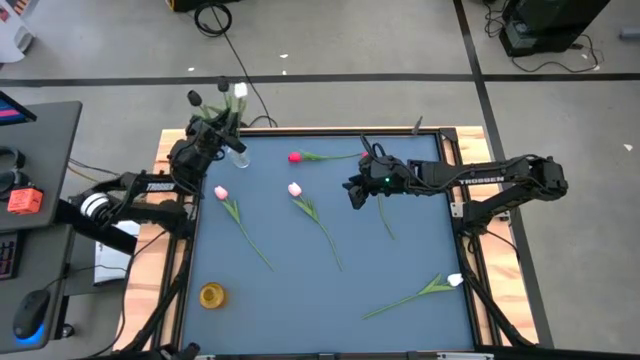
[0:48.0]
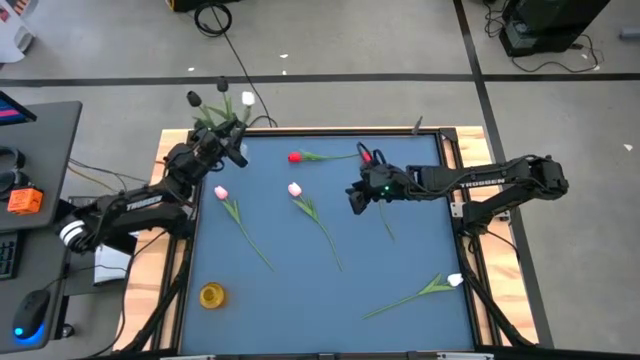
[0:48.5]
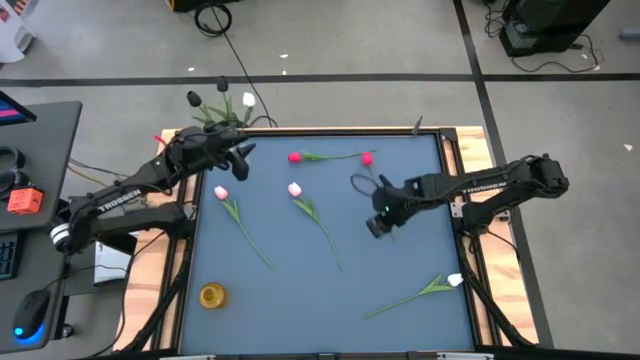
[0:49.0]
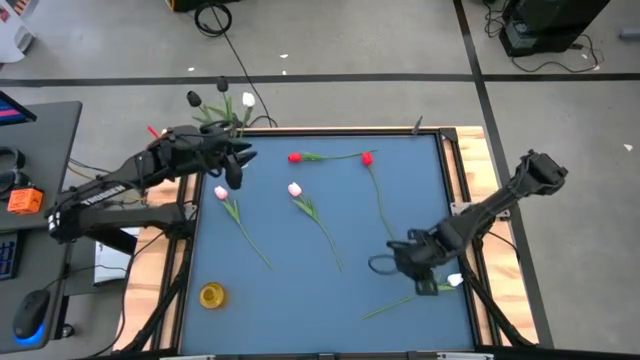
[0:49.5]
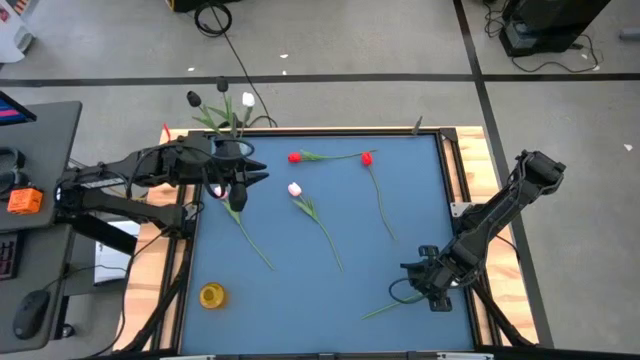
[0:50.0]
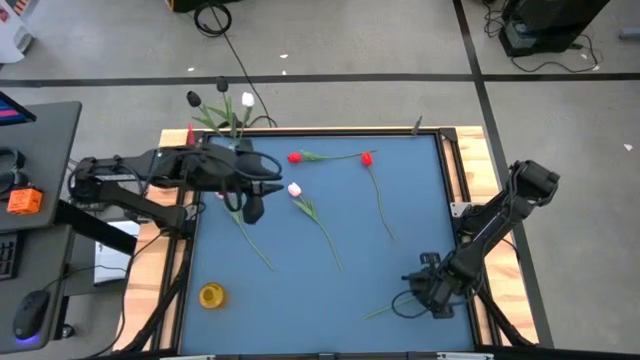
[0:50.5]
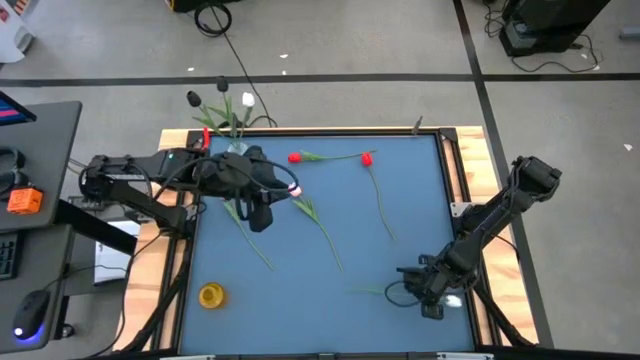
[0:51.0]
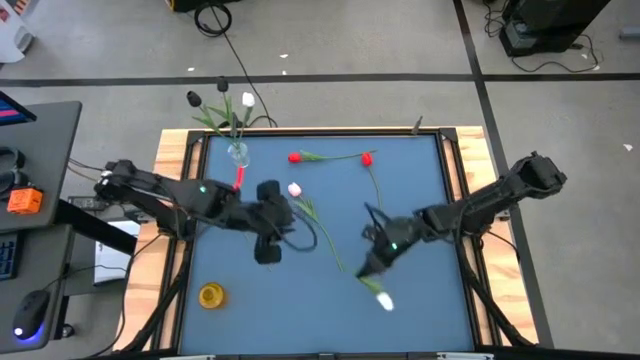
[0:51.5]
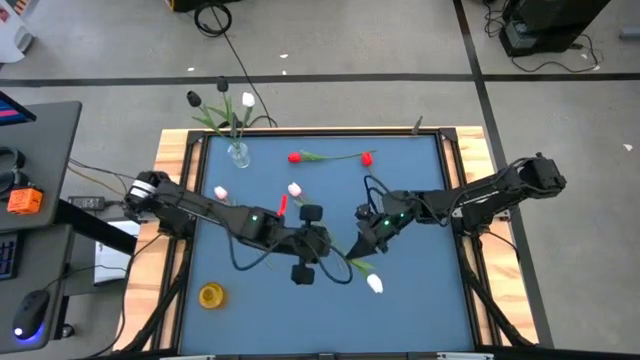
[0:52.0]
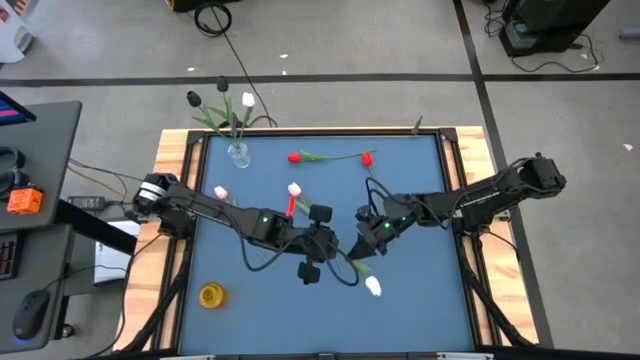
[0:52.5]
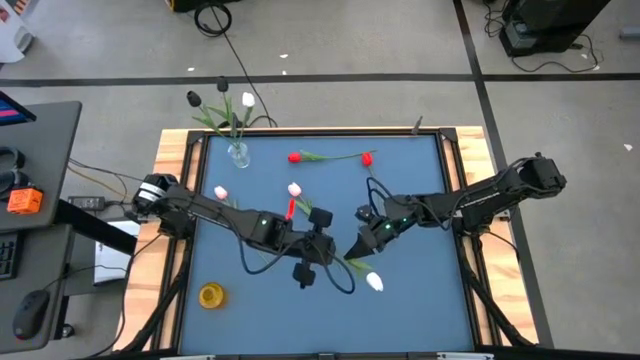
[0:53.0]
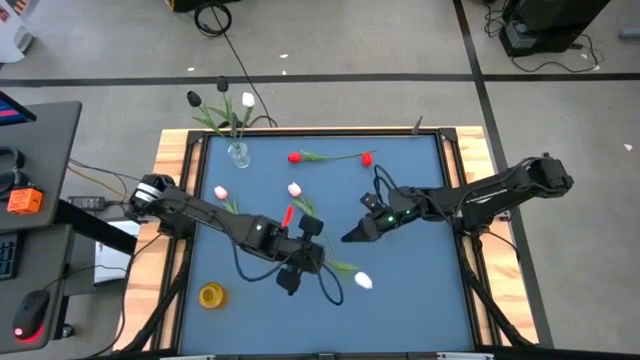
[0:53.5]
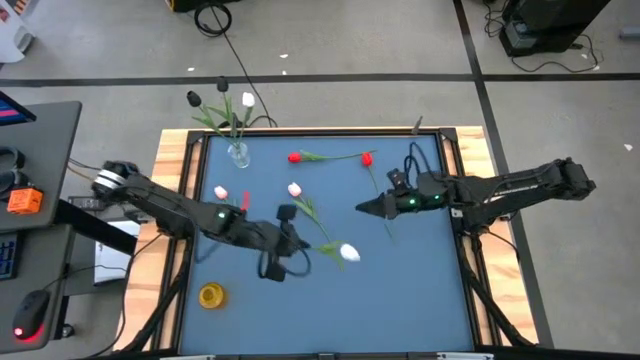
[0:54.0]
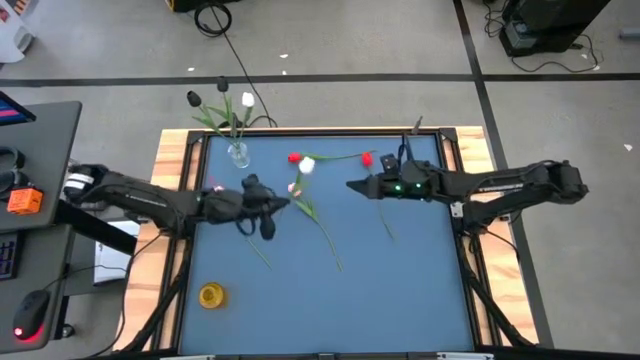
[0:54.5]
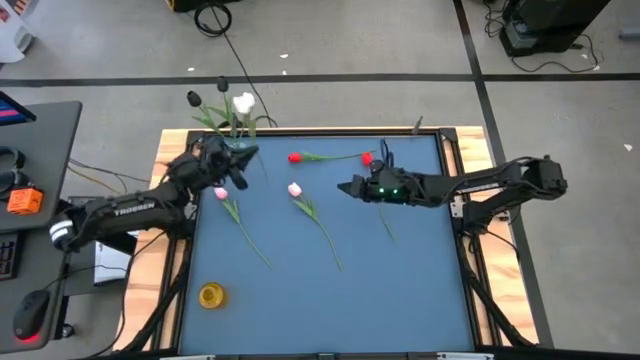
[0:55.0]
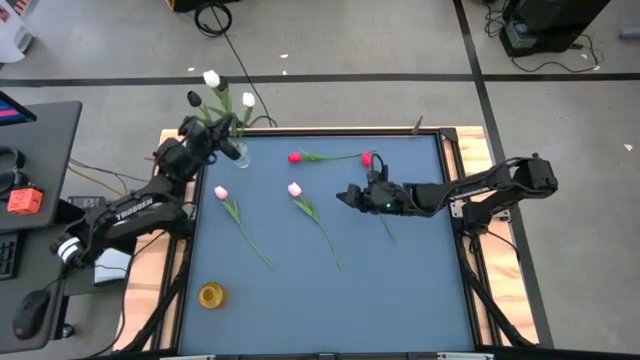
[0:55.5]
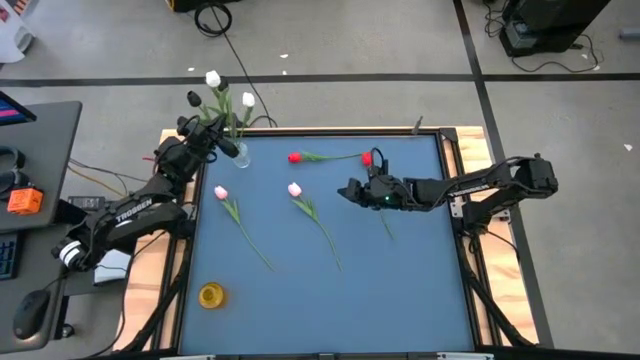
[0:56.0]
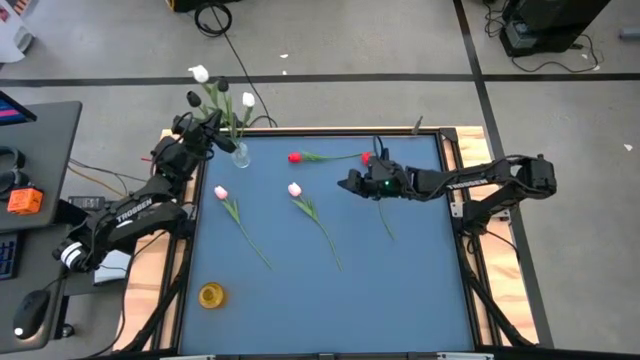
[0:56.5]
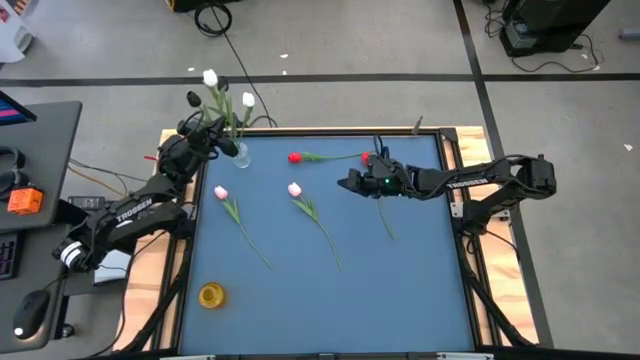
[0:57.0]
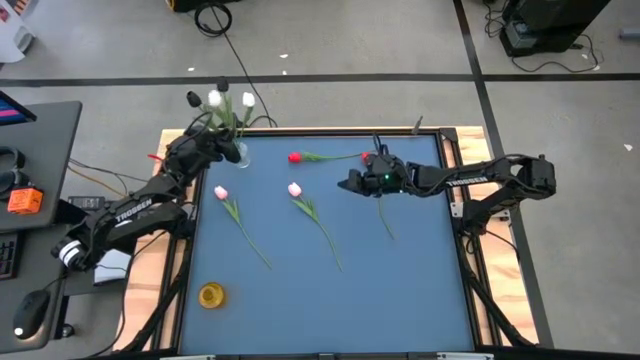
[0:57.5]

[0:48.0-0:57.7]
Task: Sort flowers into vase by color
Put the white tulip into the transparent vase

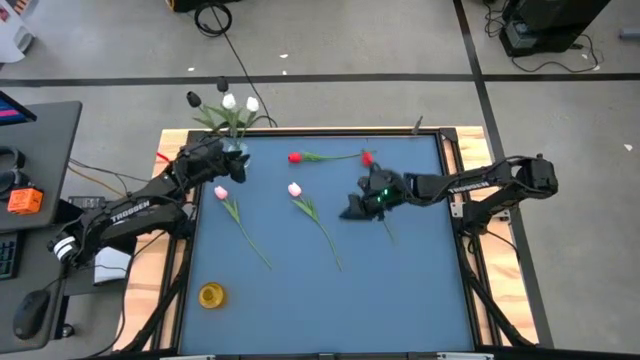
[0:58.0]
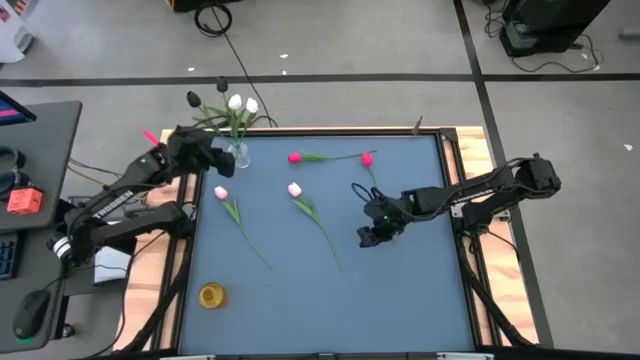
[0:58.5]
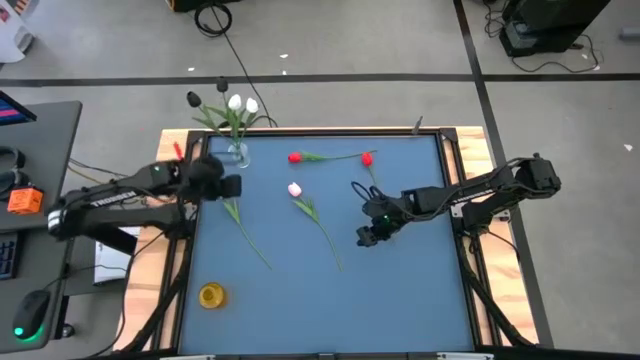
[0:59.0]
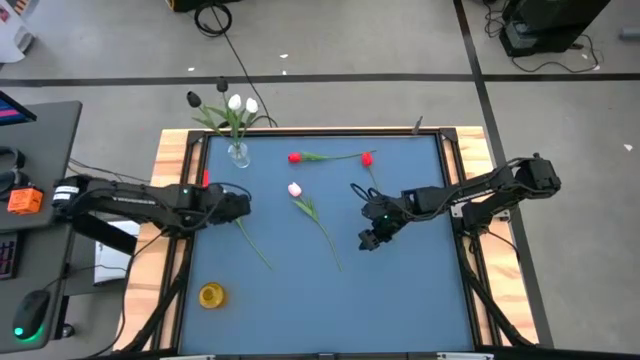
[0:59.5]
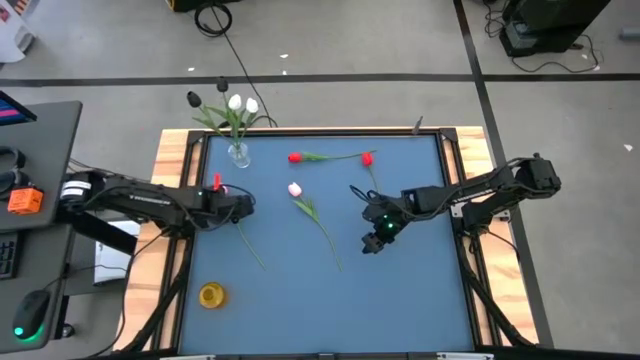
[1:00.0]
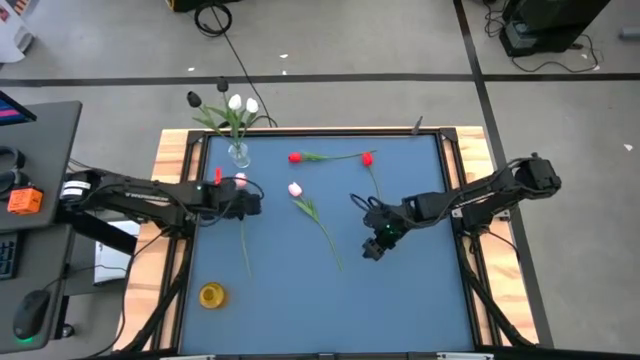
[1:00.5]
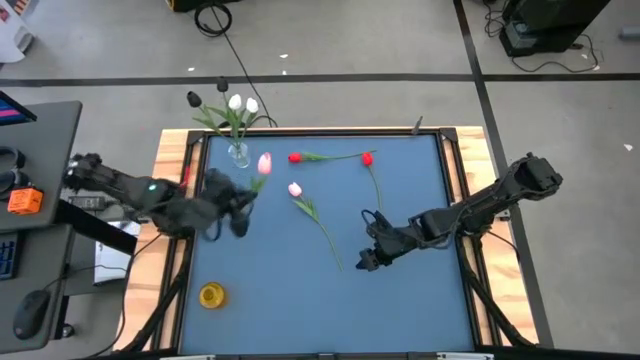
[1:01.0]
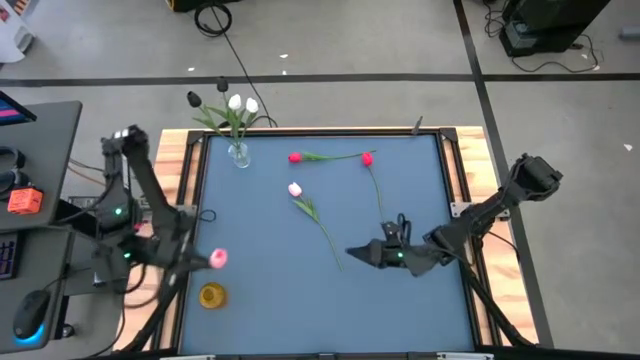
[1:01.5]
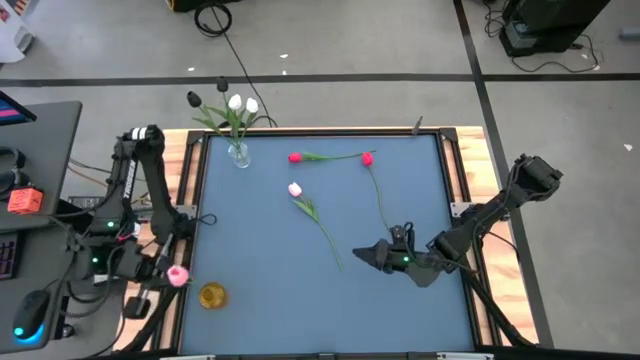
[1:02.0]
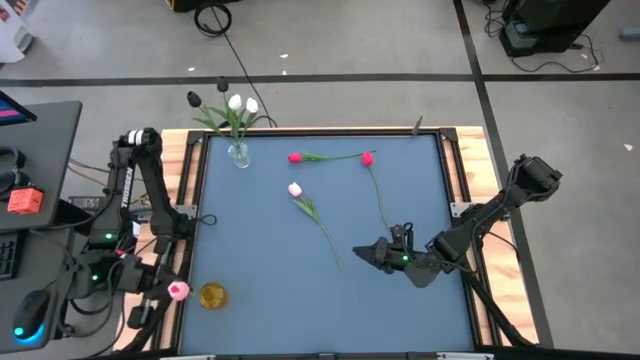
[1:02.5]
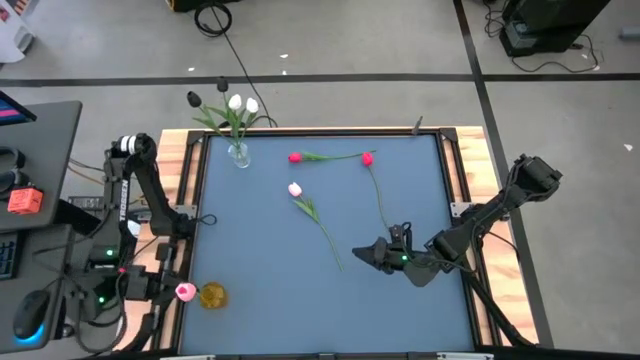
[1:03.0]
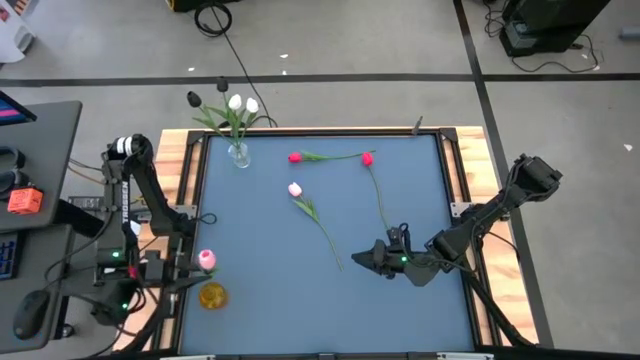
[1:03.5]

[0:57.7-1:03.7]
Put the left pink tulip into the yellow vase
